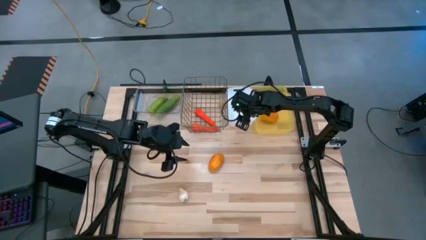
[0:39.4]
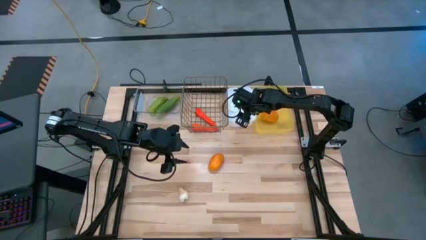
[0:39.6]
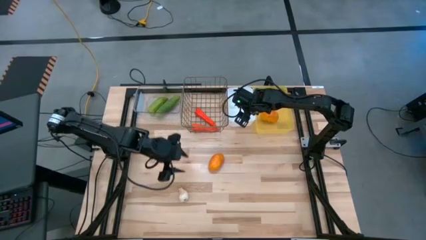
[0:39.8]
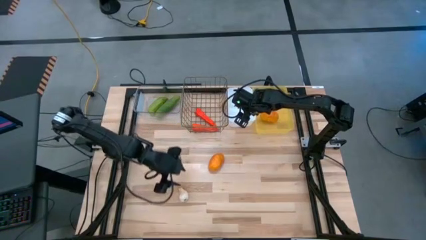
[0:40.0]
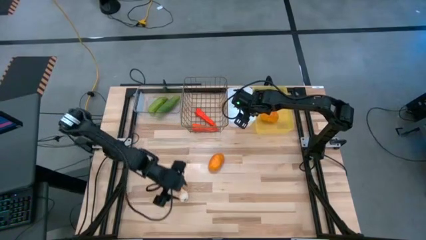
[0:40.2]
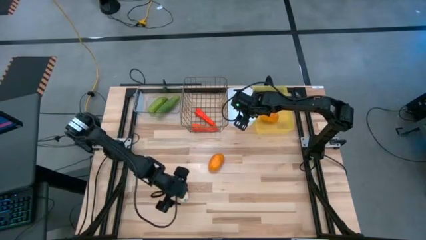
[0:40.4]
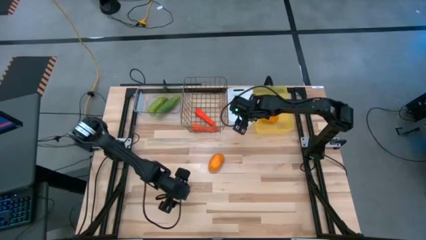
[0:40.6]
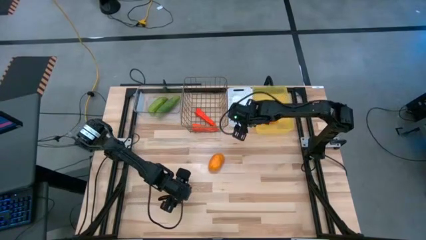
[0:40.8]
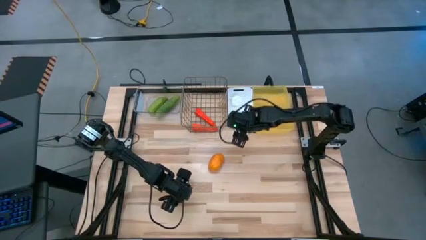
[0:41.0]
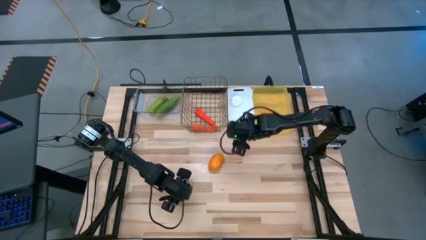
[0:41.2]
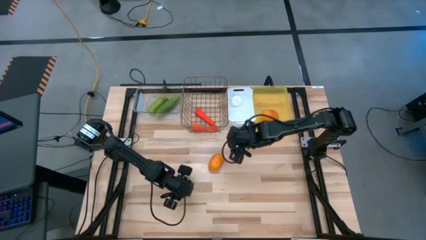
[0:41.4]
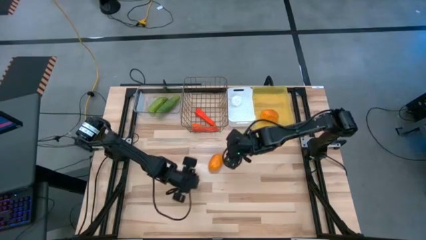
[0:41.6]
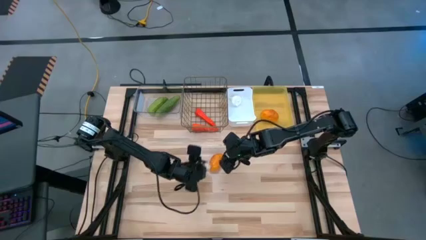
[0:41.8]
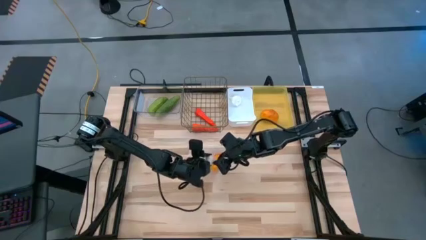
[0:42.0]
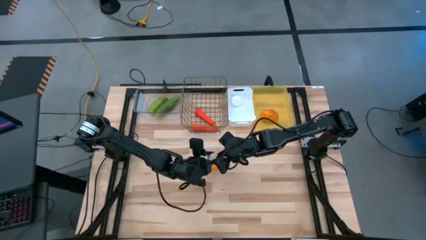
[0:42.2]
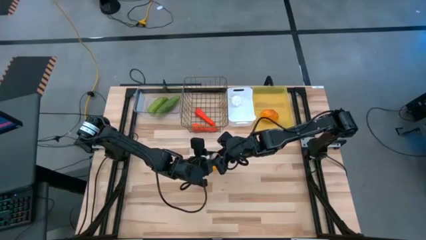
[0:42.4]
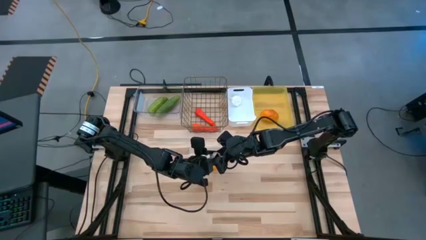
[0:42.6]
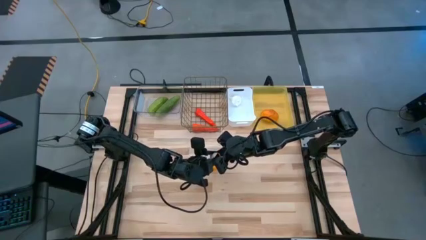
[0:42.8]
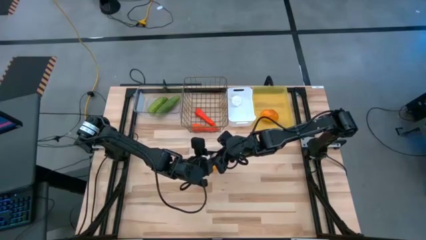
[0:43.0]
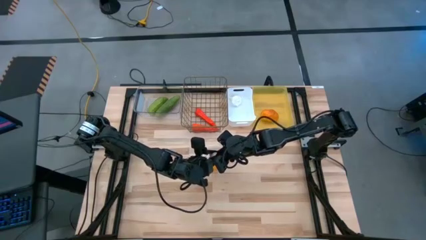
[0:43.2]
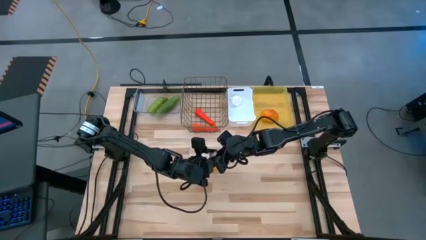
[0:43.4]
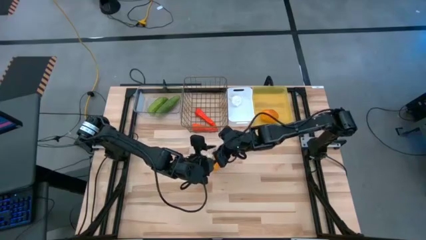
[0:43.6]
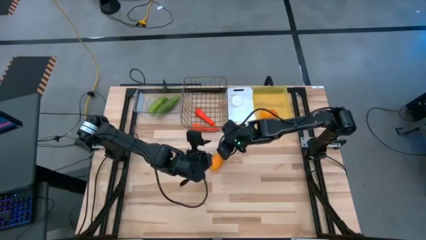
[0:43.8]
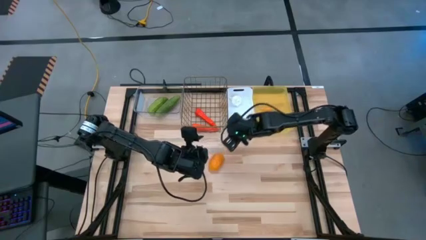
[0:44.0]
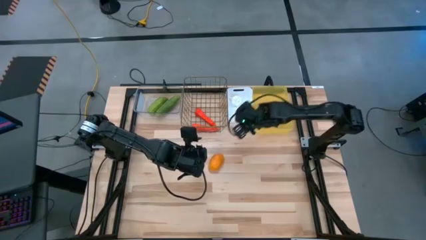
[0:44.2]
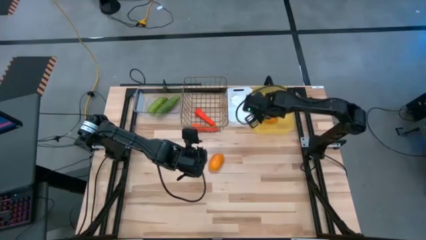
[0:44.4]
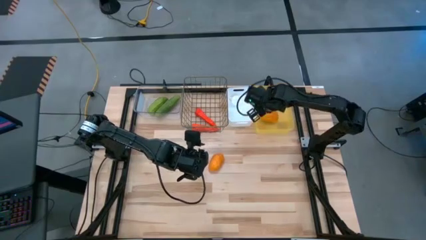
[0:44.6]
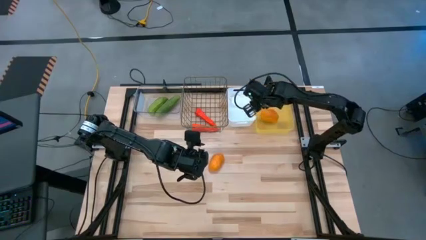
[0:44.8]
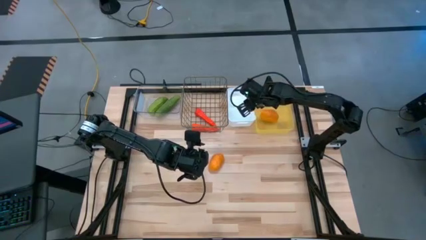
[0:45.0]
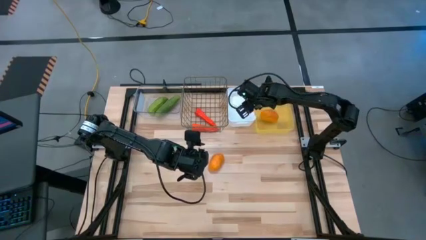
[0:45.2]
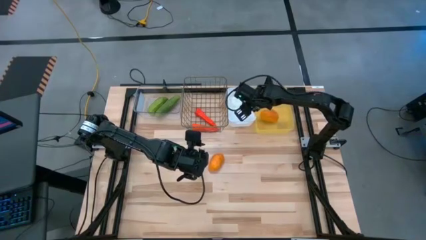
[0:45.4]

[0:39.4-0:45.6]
Task: Sort produce into baskets
Put the garlic into the white bin

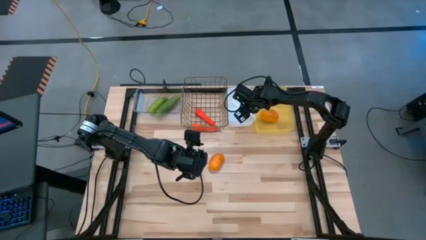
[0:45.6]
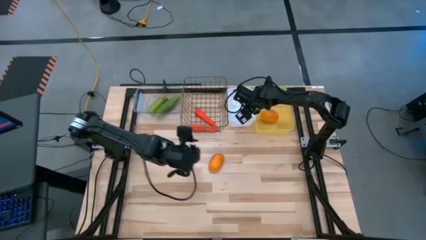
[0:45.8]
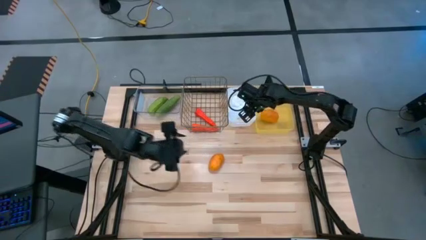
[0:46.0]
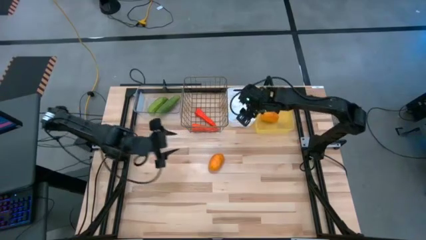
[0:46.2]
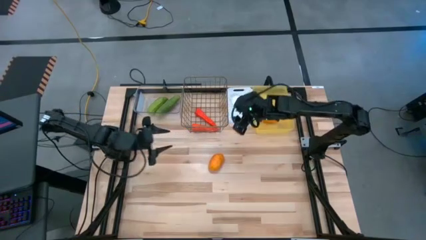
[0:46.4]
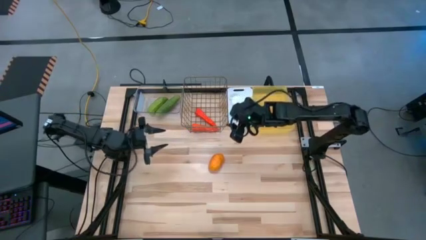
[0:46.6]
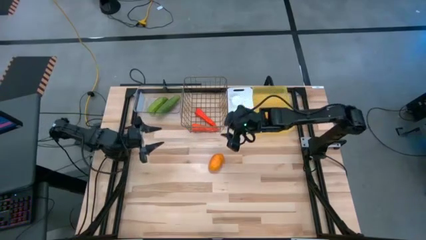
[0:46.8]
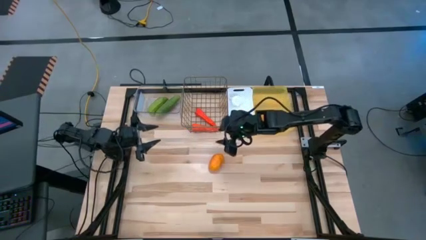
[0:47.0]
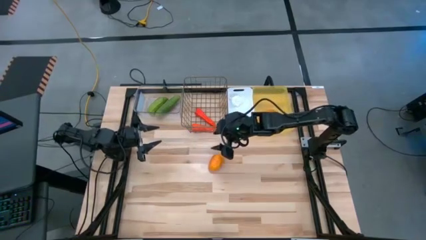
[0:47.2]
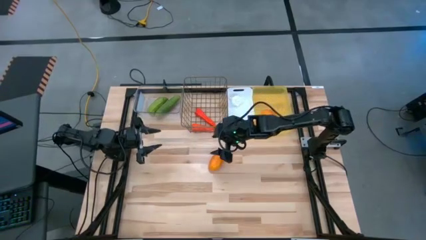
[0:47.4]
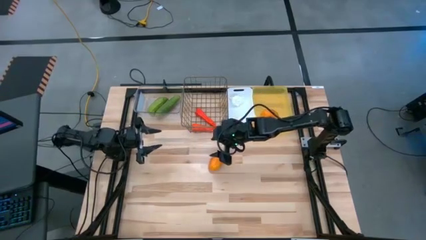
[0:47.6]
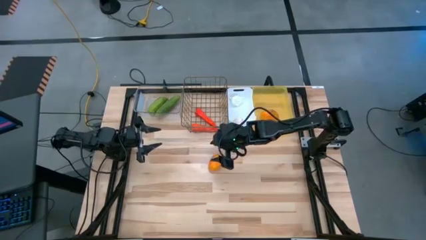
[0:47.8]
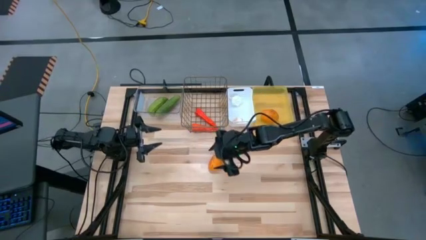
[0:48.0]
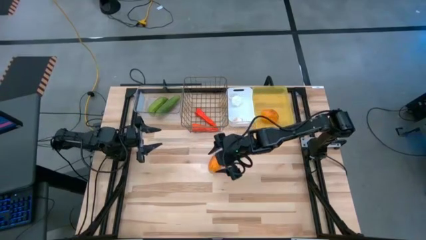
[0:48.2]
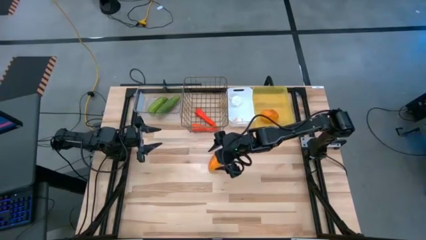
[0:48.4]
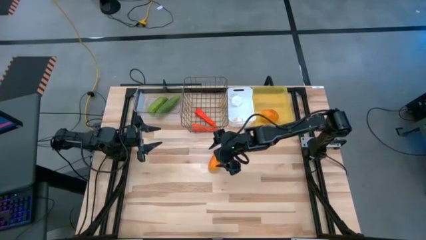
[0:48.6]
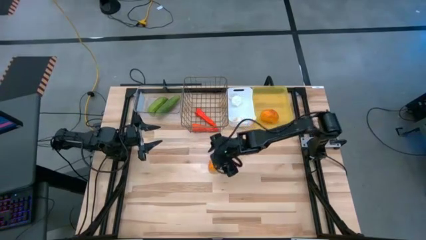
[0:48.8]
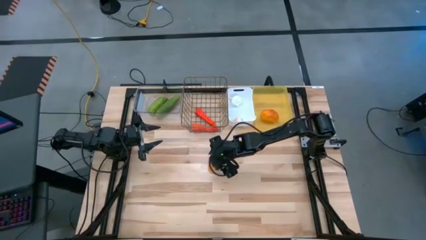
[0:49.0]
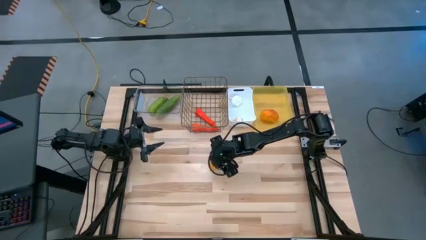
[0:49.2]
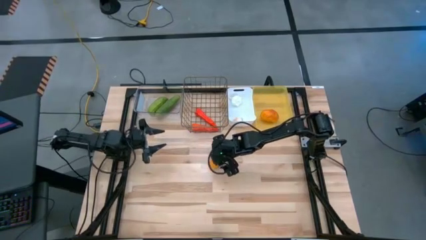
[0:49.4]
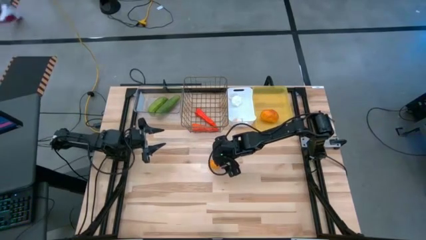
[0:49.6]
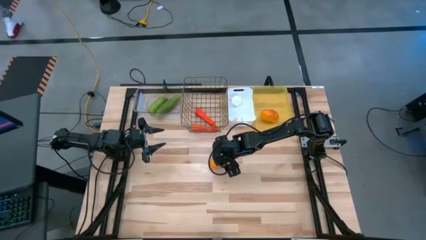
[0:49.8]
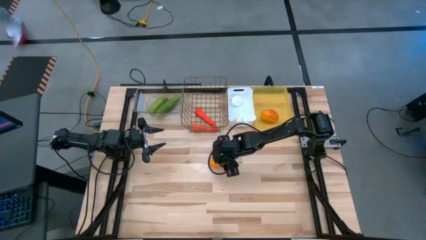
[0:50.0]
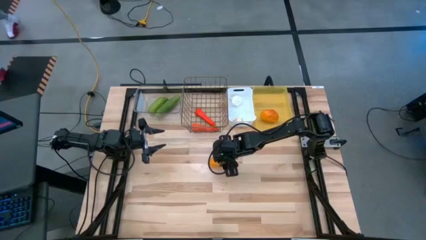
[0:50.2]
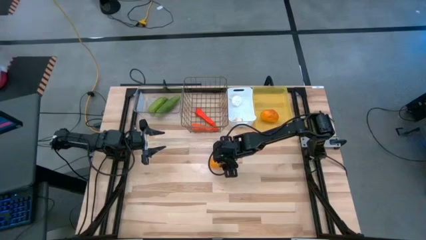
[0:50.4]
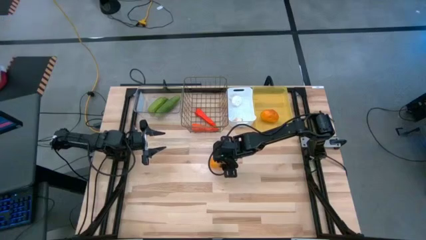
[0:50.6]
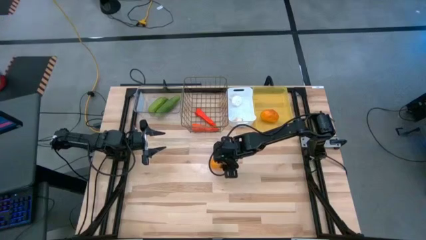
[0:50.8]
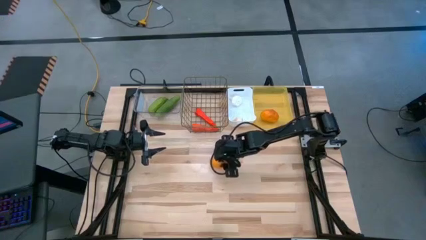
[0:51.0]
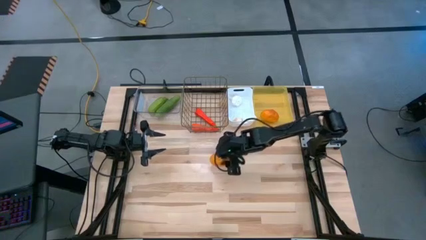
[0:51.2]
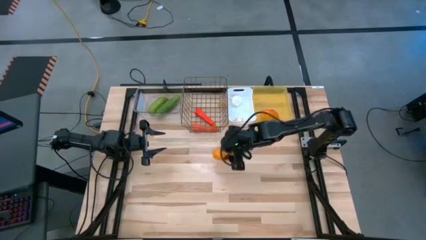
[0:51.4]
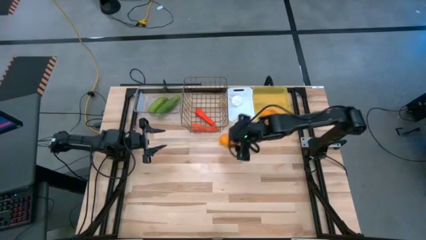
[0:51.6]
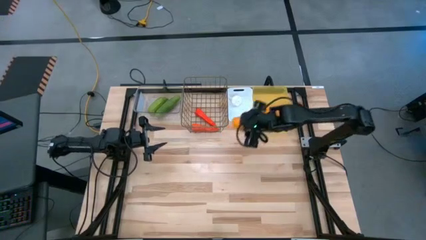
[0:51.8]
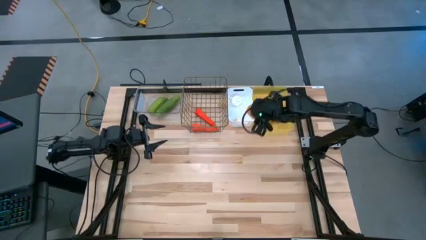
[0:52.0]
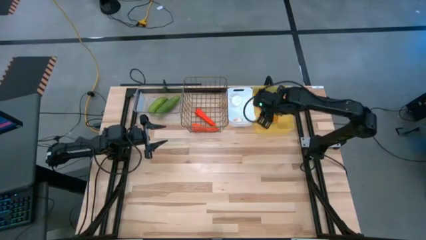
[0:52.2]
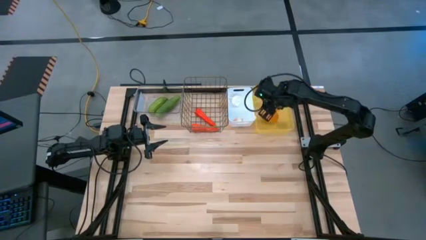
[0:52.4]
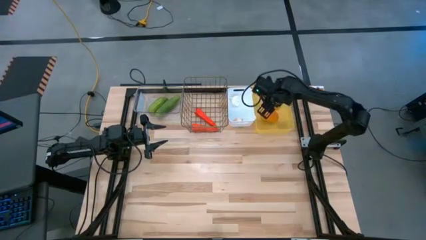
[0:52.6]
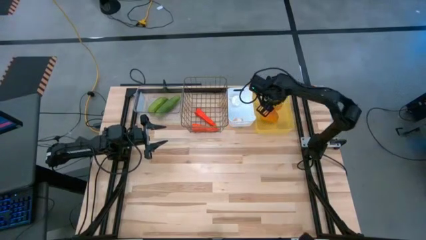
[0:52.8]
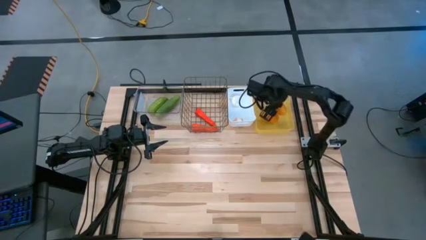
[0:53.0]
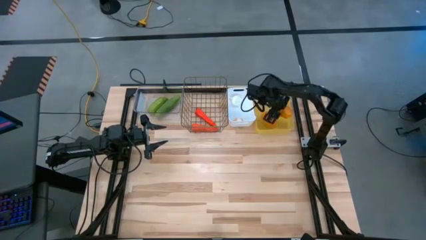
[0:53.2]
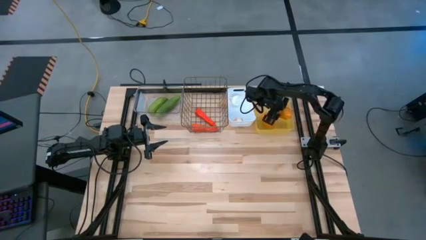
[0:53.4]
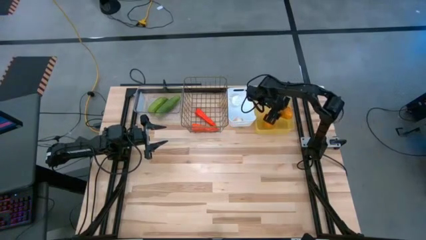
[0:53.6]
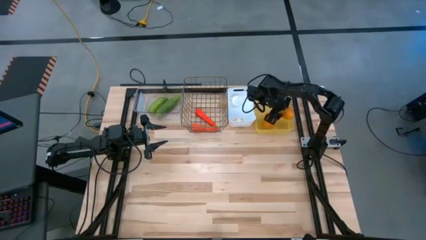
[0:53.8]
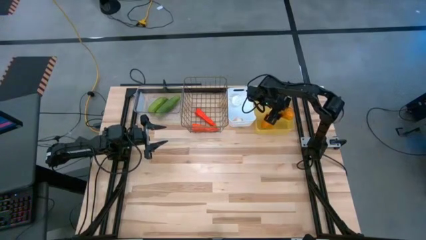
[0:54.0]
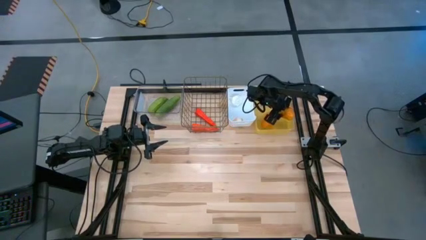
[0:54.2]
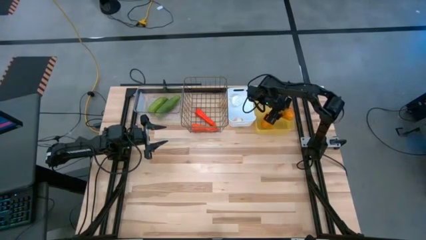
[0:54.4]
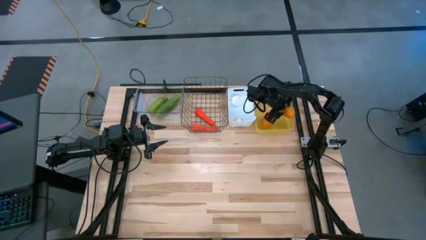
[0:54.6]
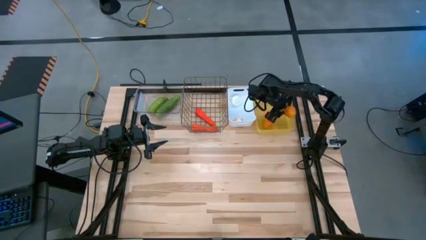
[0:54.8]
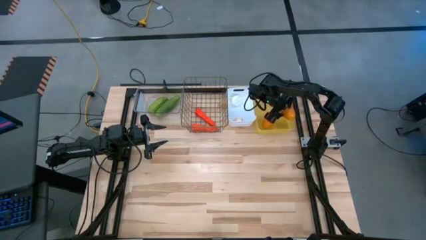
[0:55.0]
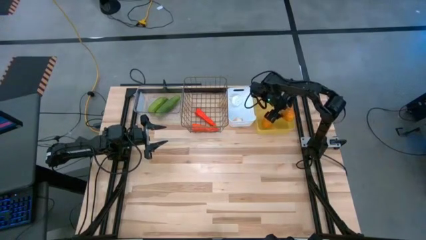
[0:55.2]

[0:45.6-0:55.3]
Put the potato into the yellow bin
